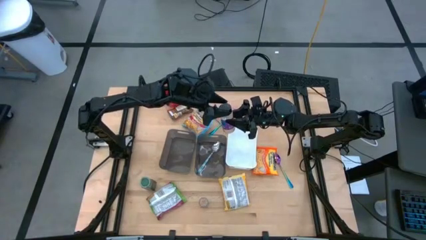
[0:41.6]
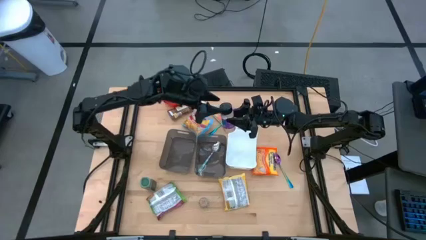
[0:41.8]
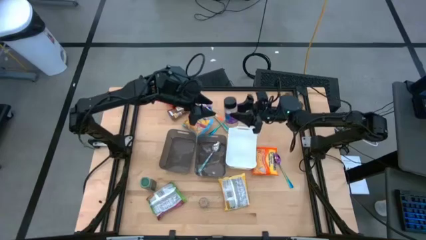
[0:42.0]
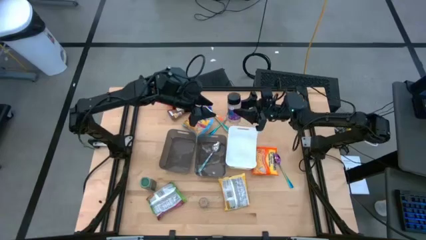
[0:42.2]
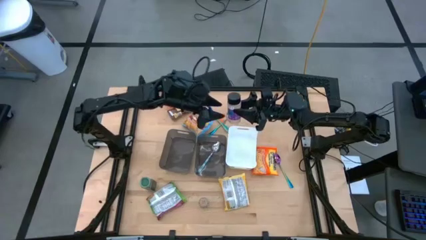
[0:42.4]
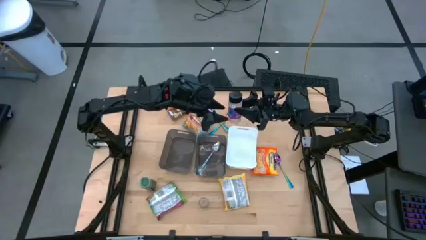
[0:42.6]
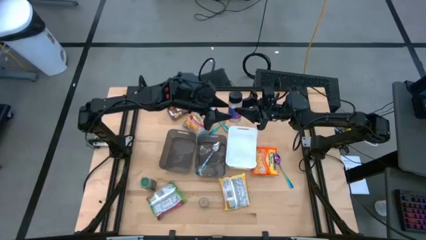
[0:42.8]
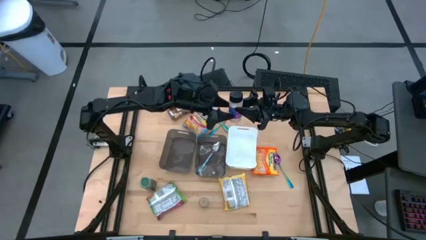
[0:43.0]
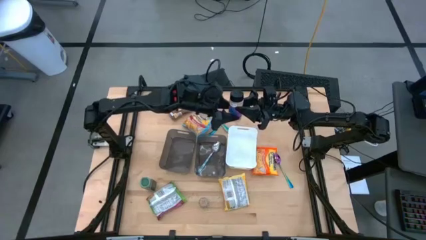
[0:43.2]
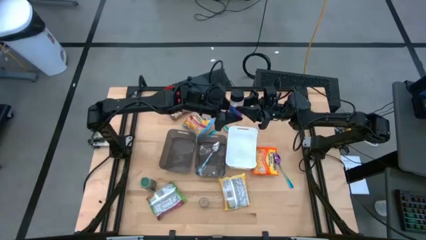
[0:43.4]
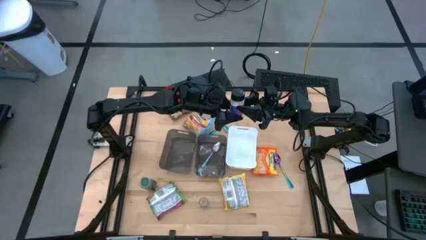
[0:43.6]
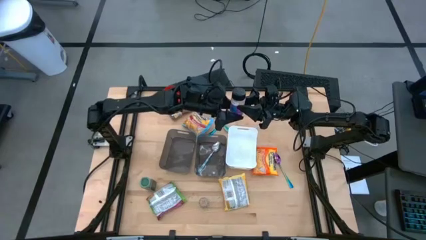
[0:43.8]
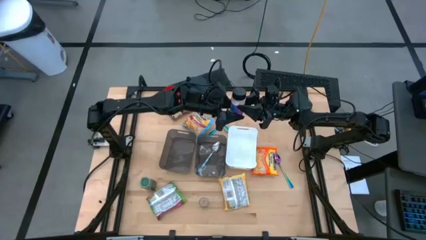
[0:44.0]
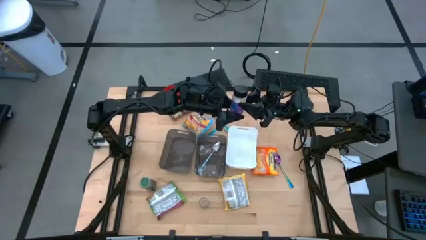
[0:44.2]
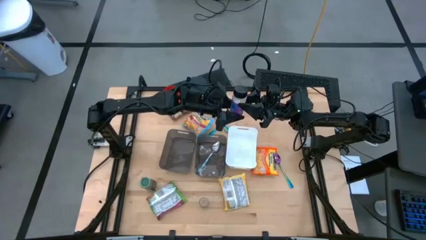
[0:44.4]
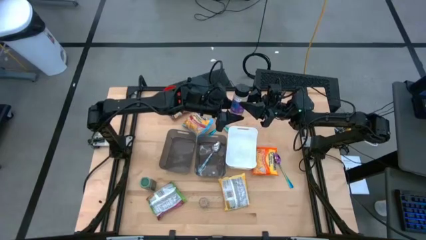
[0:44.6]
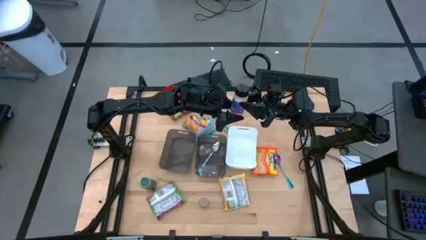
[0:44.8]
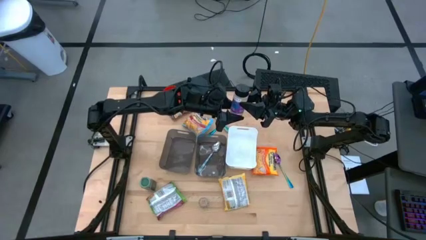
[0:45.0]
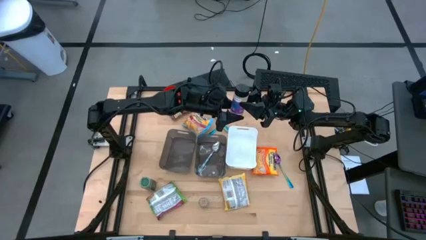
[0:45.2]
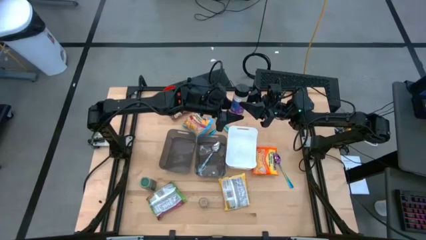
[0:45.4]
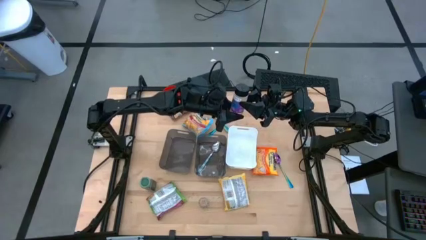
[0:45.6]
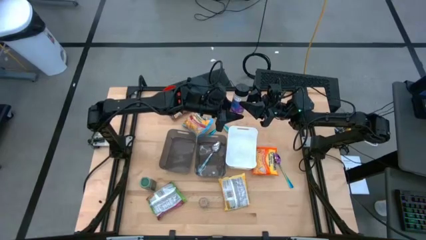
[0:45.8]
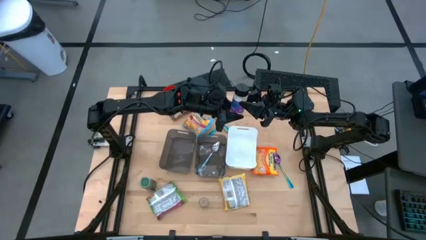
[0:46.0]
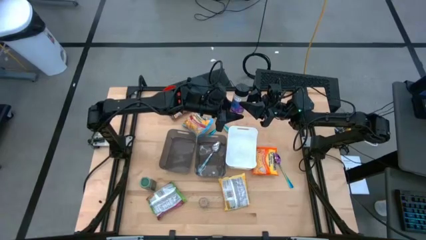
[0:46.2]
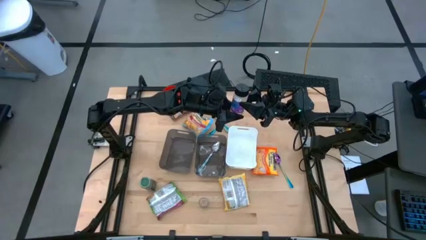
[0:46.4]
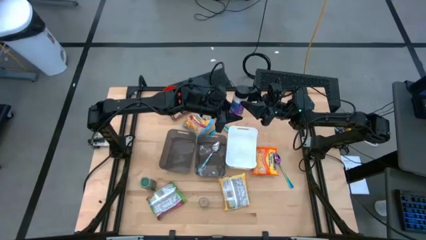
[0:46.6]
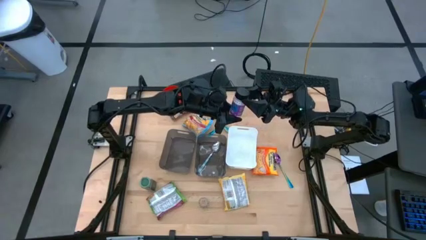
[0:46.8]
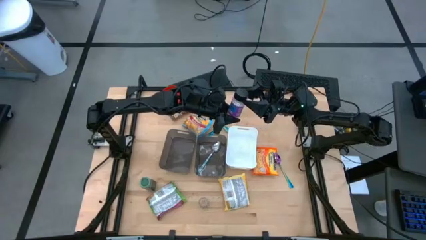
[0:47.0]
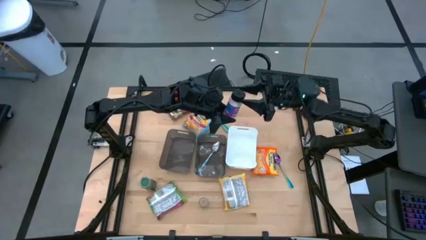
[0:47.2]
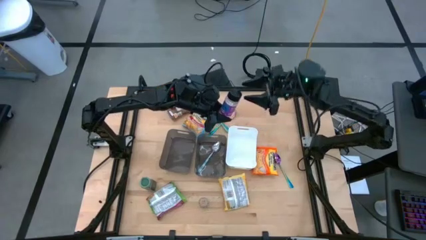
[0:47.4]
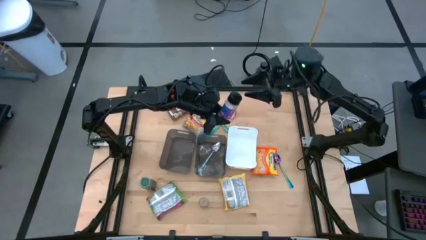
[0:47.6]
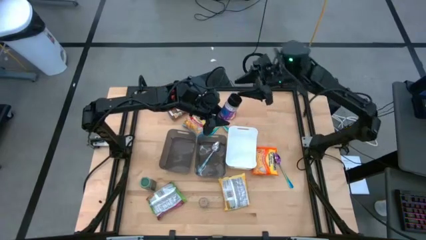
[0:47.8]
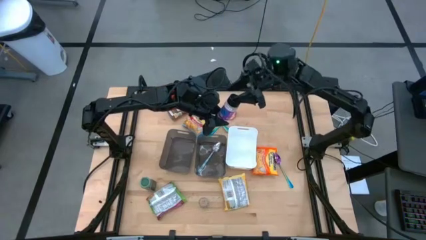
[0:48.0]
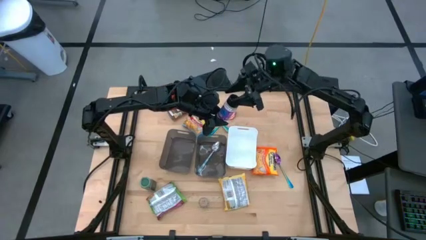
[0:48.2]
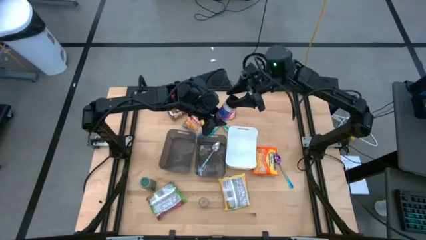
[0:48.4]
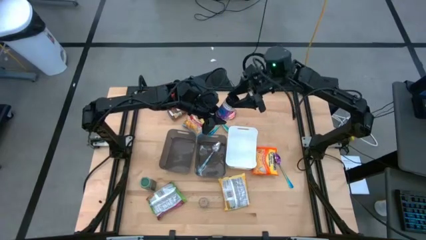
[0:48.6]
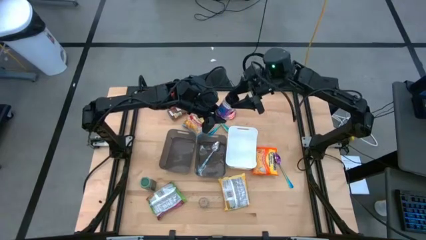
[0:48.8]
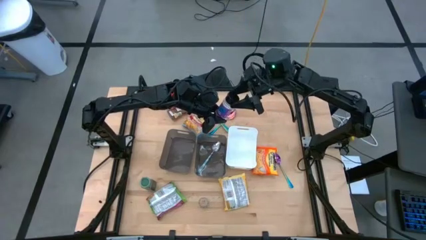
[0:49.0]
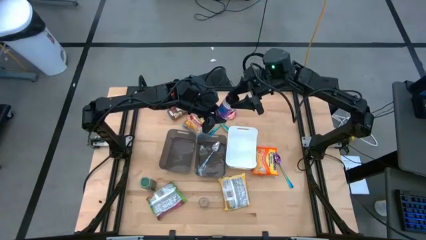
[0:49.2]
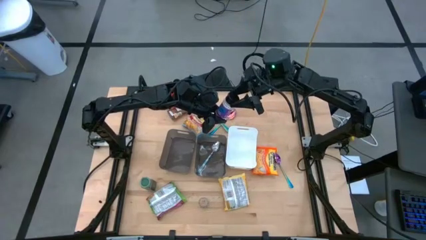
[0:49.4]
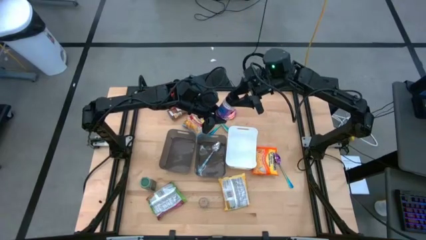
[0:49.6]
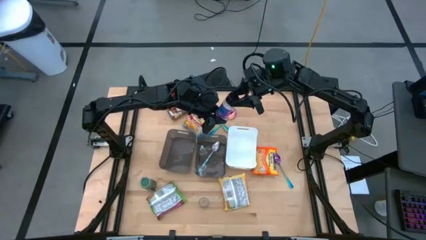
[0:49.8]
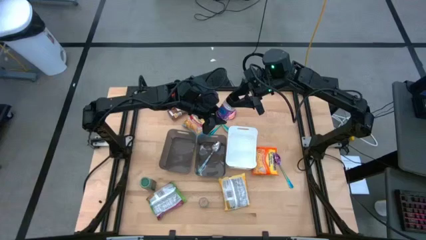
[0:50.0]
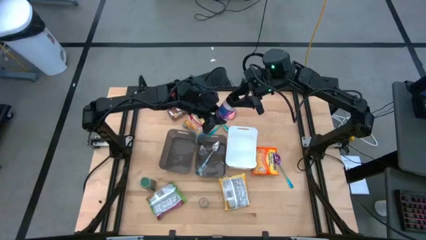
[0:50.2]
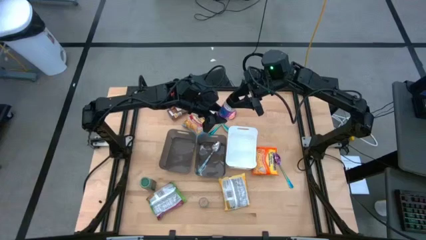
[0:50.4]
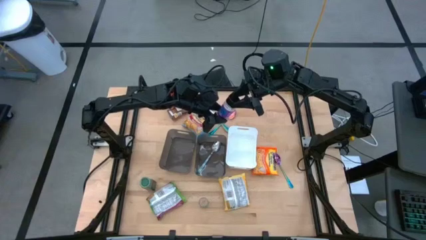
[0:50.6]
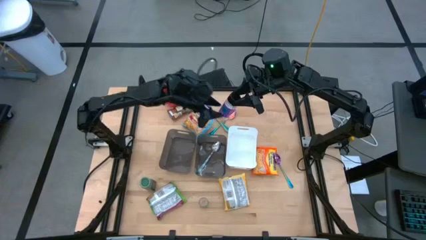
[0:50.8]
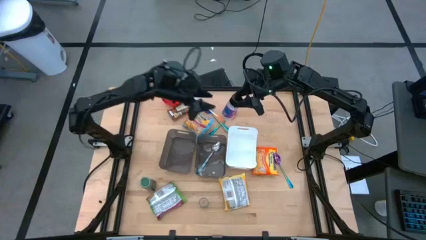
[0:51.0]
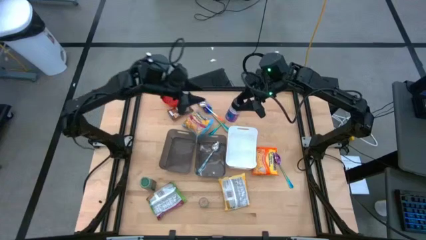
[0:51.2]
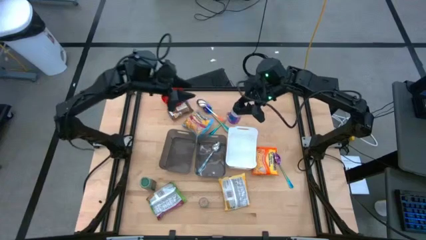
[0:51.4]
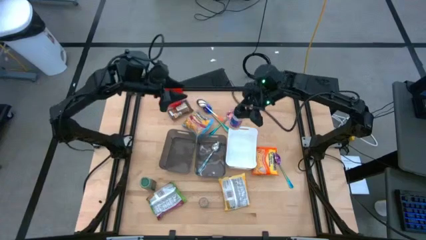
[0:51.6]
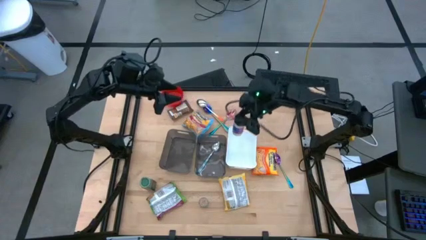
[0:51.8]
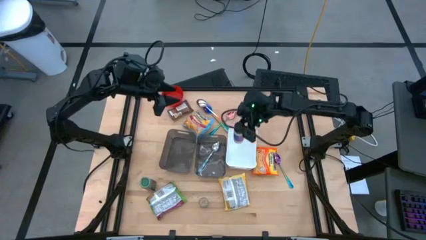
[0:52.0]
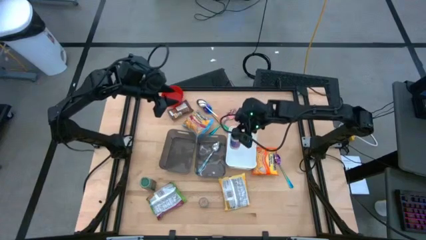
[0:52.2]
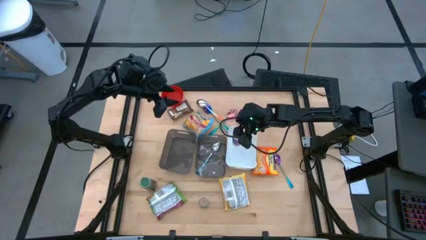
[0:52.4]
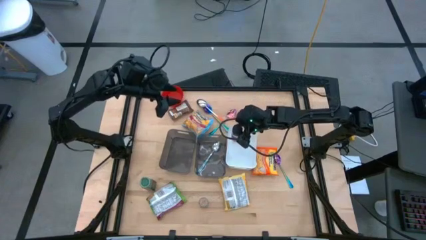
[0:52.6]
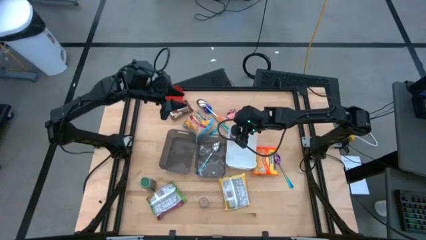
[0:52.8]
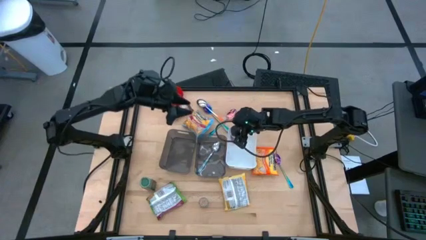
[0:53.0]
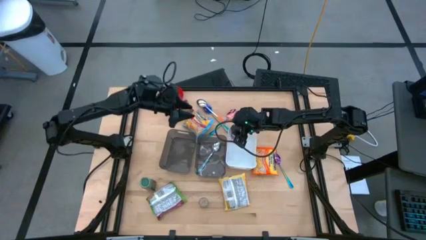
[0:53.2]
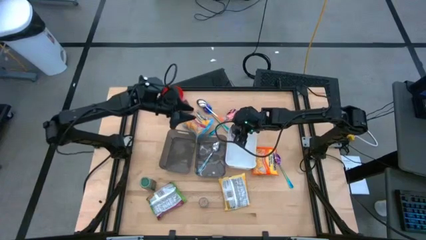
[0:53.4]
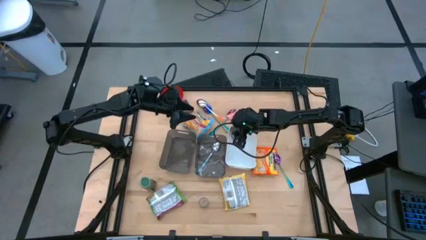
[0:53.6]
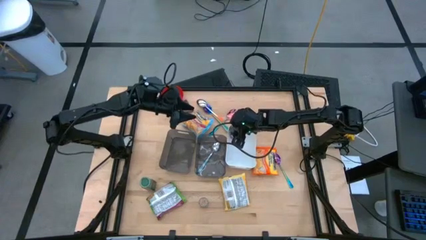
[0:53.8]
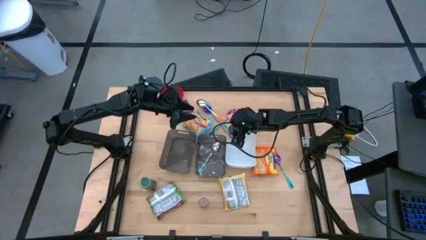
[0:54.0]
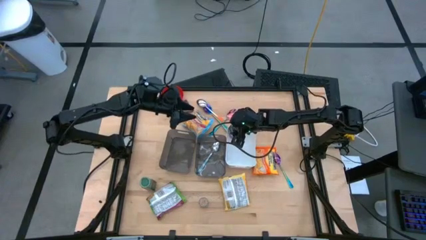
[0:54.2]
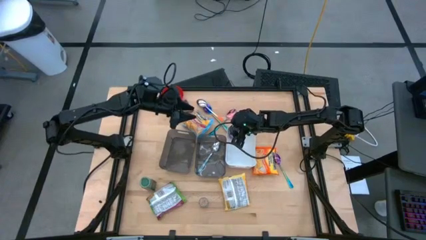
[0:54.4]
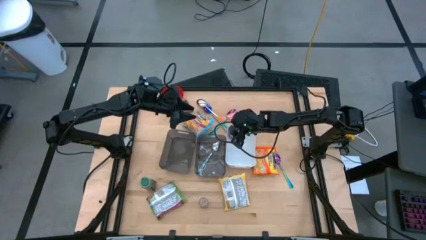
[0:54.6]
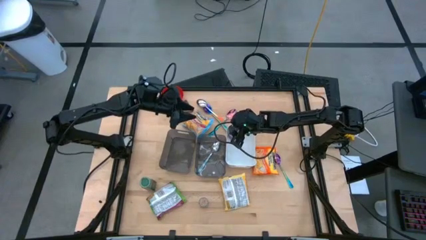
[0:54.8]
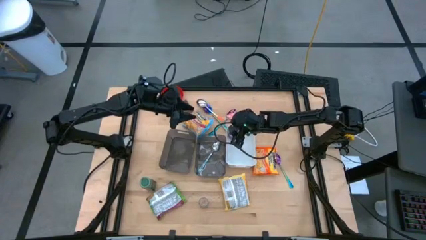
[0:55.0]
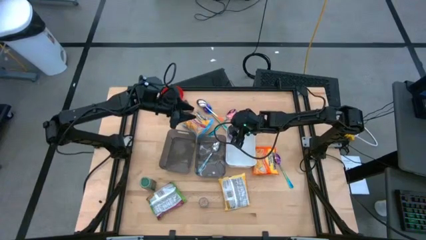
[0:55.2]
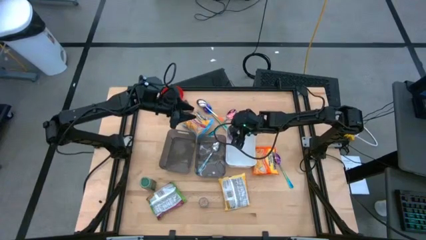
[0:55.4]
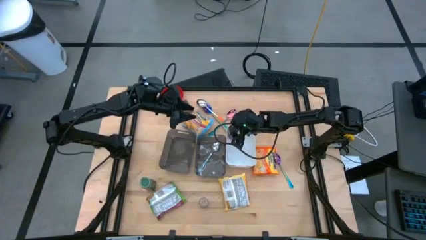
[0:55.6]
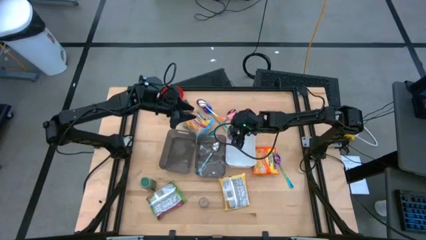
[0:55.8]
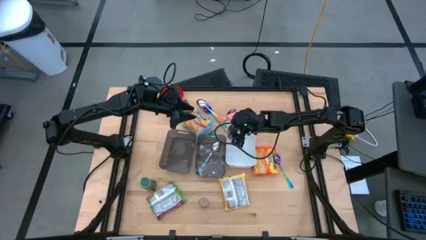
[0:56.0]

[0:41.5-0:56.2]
Task: Pick & Place Food Item
Put the purple bottle into the white bin

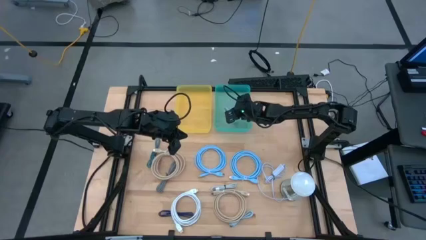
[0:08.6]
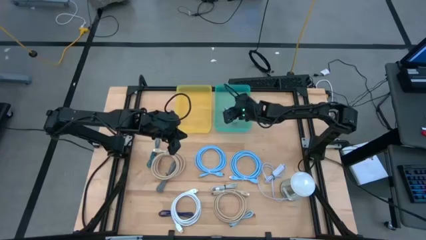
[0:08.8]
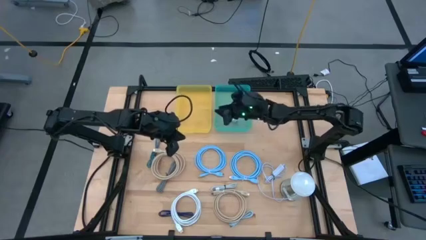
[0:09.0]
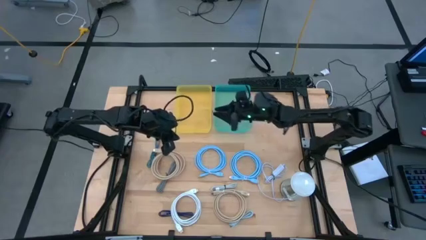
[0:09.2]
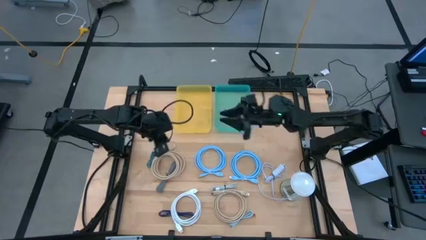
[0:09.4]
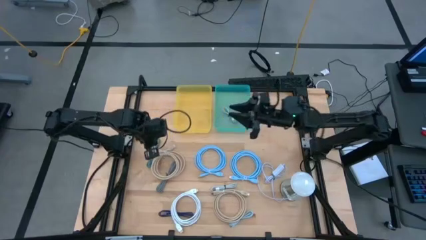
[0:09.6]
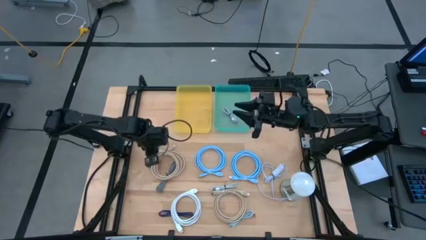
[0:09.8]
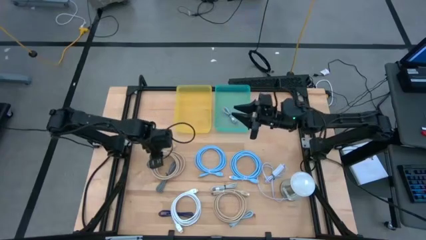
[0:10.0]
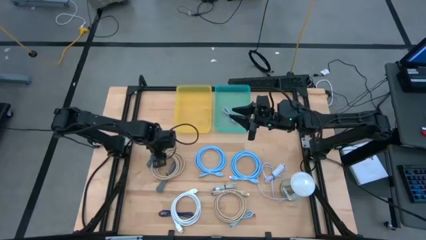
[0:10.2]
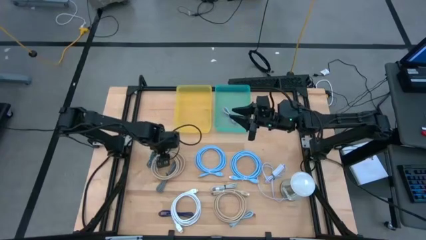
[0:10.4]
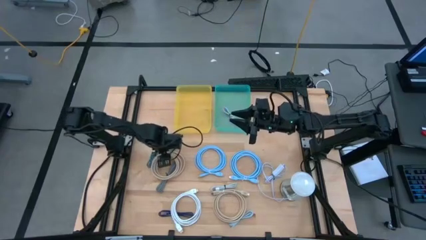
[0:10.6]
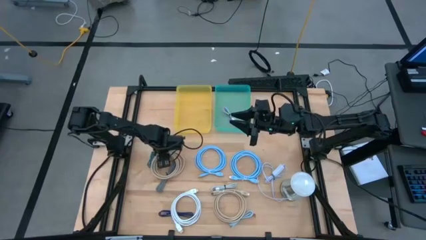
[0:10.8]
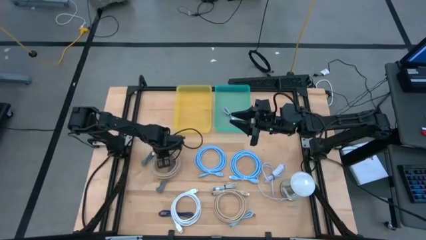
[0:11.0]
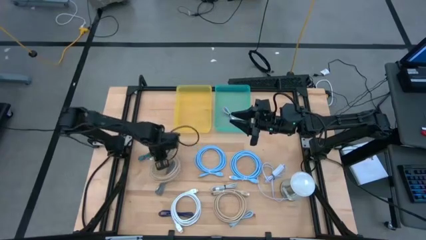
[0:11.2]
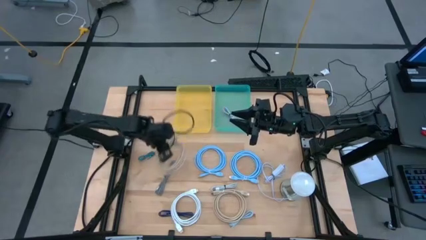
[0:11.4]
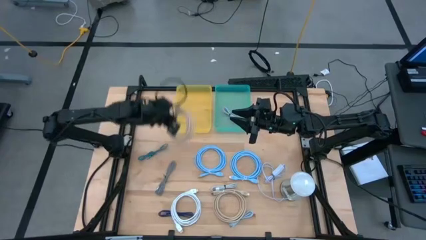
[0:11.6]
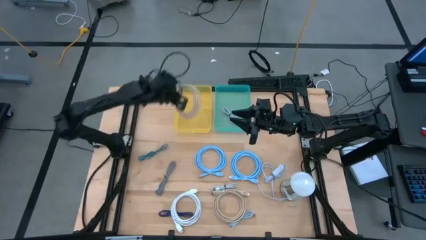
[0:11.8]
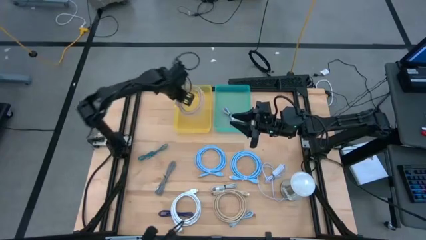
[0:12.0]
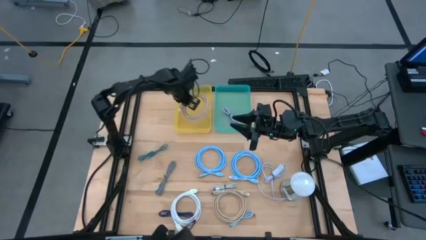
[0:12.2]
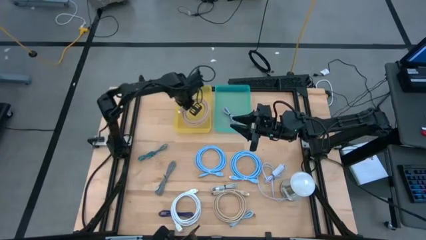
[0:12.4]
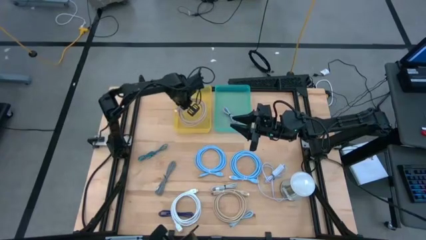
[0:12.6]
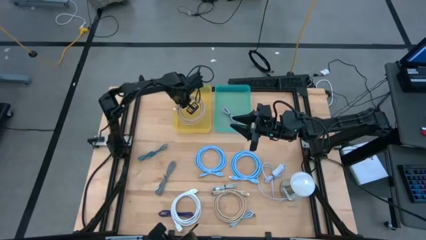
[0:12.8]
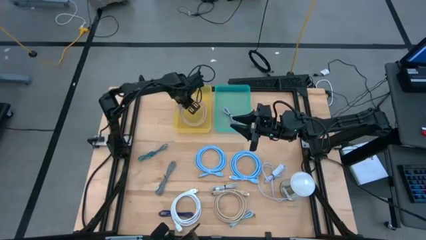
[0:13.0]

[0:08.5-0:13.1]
Task: Pick & Place USB Port
Put the top light brown HDMI cable into the yellow bin
